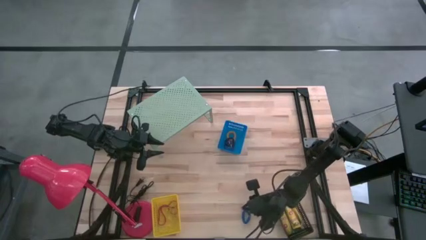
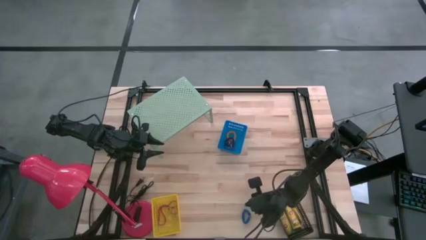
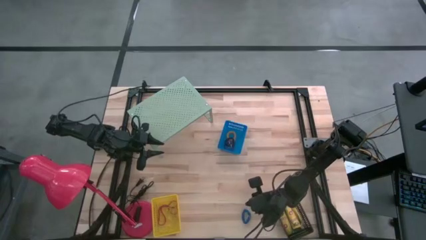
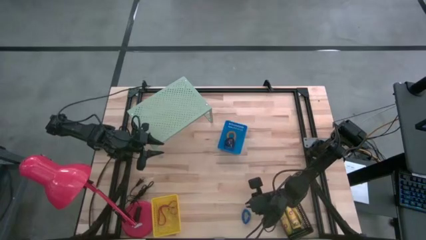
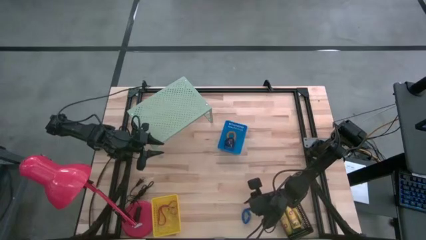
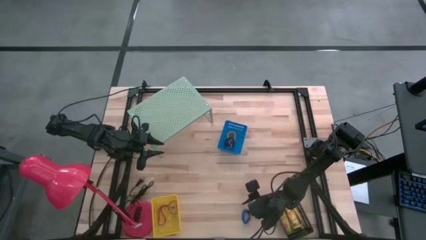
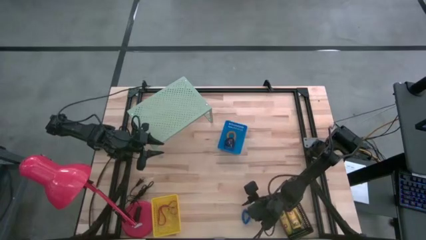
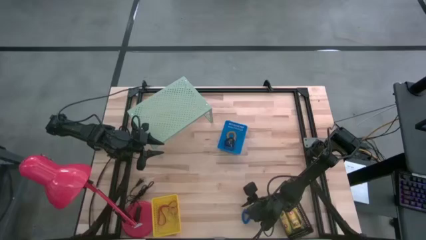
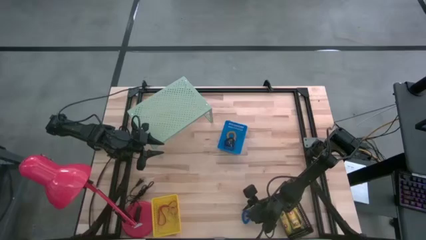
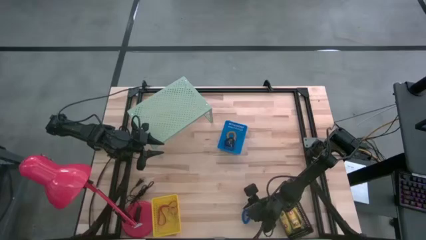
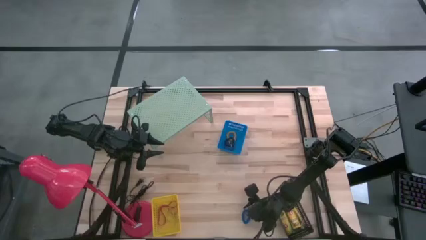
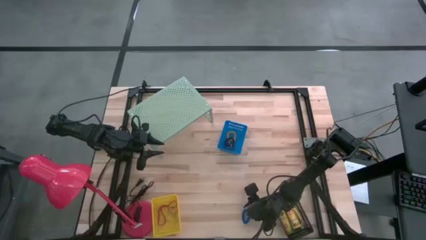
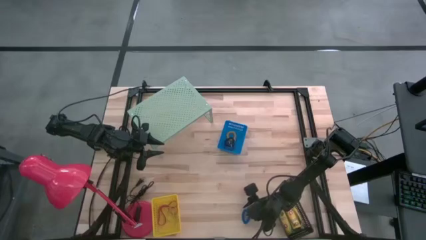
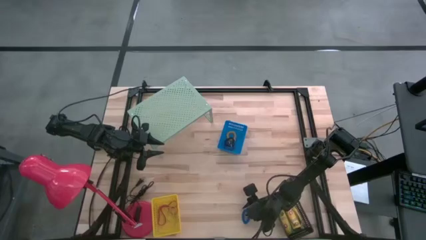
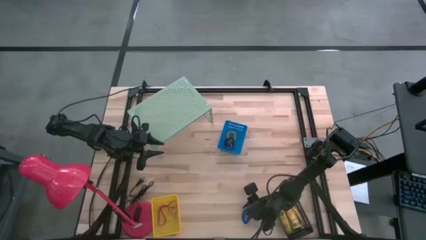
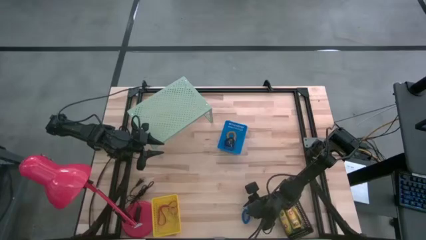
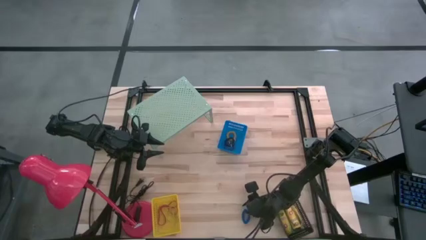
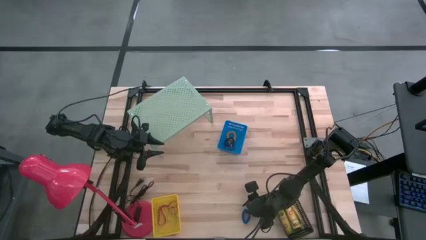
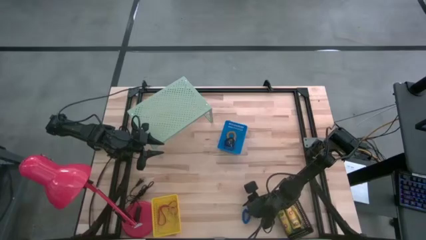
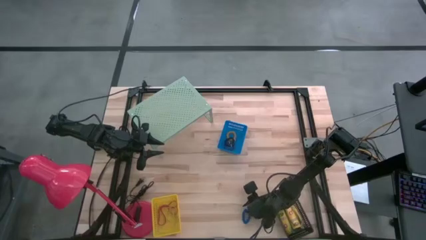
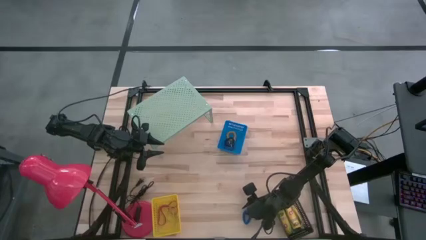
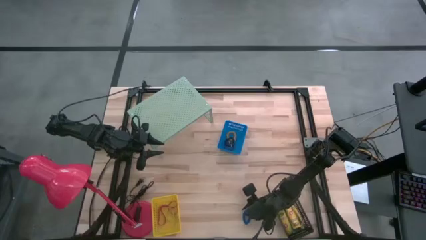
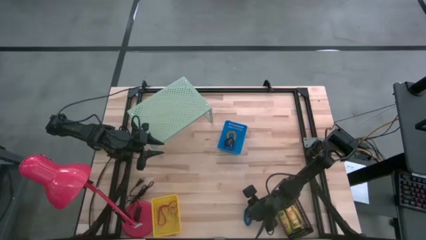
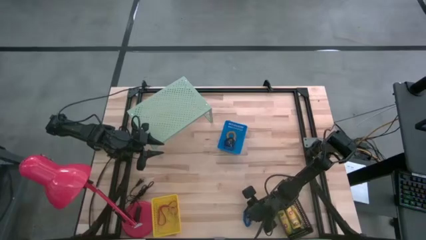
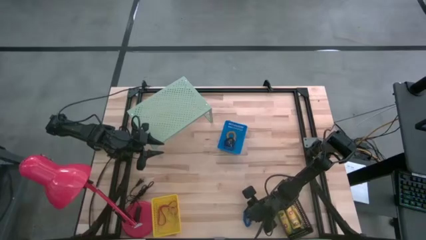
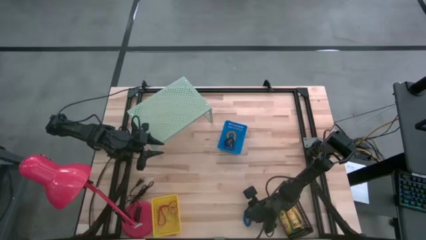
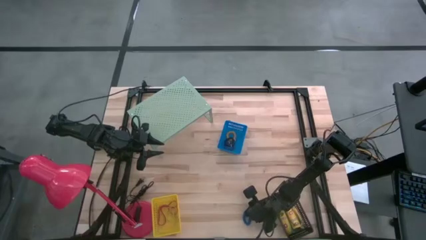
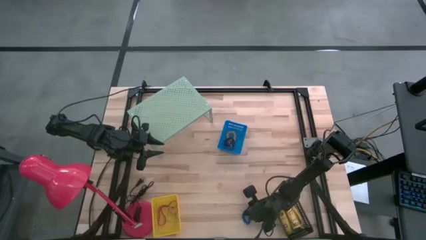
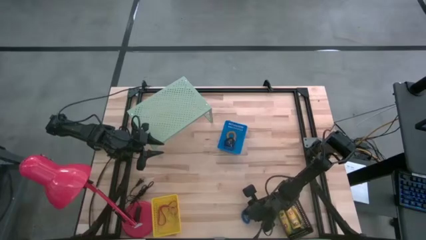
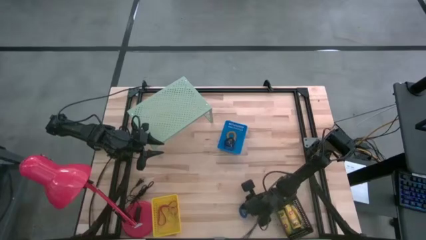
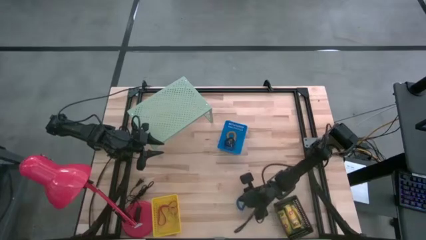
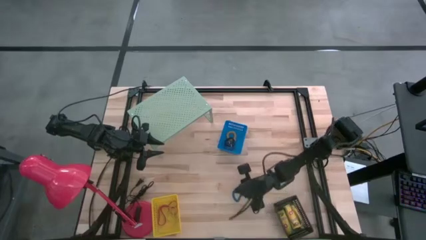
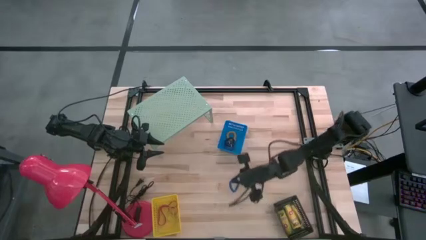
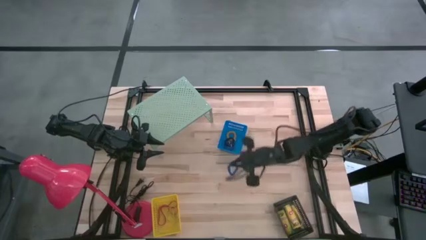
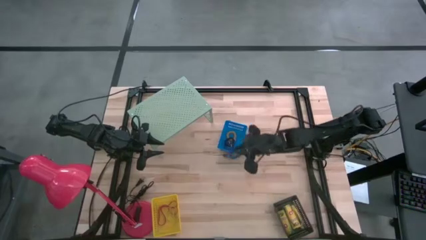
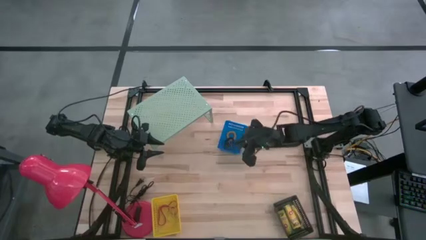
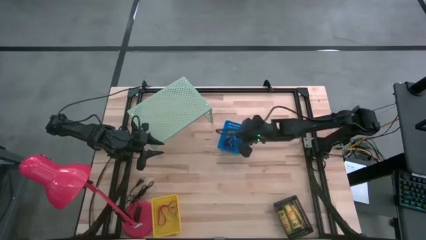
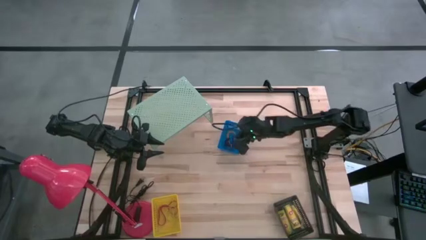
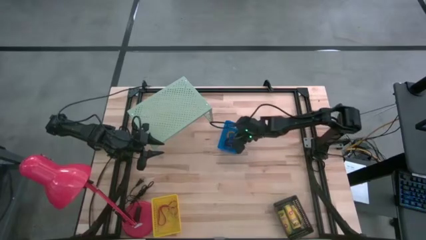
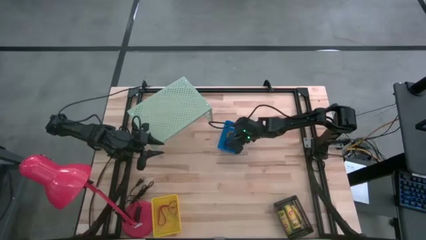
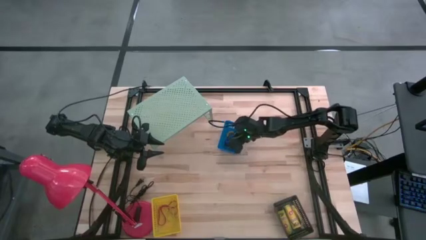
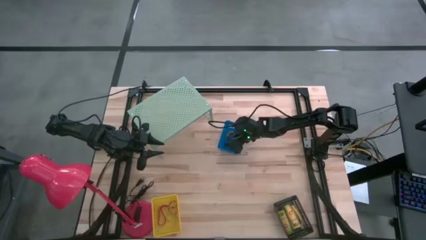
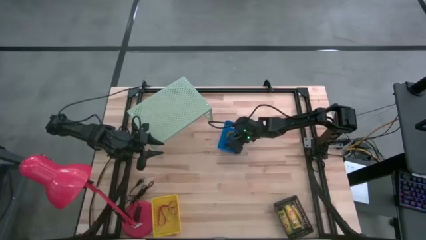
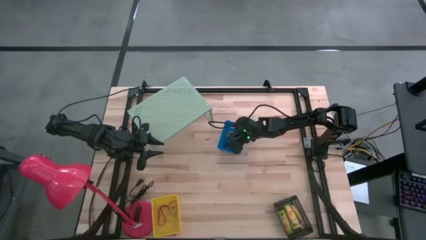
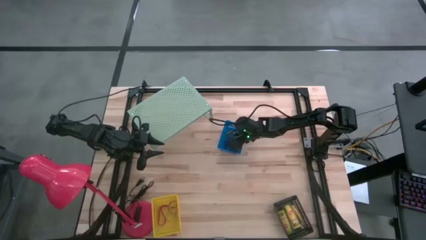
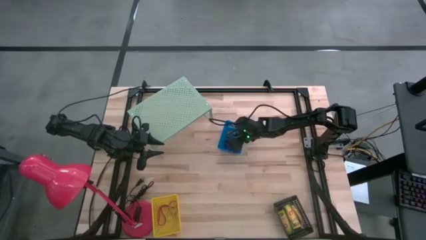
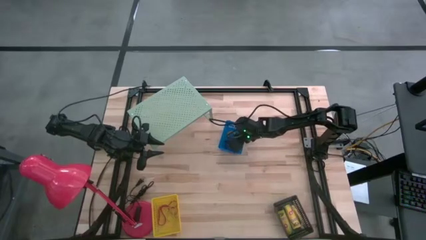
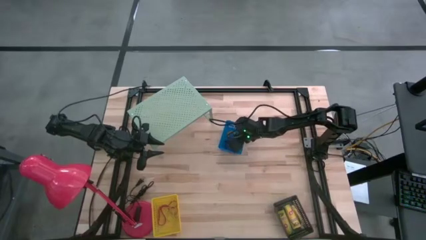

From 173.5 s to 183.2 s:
Task: Pick & Place Office Desk Supplies
Put the blue spring keychain into the blue basket

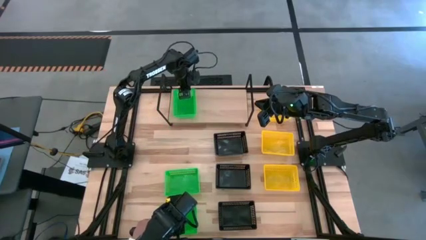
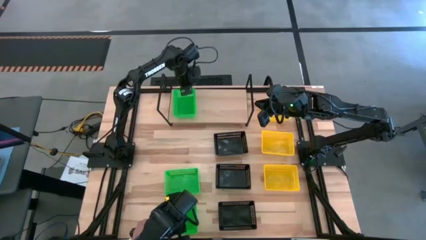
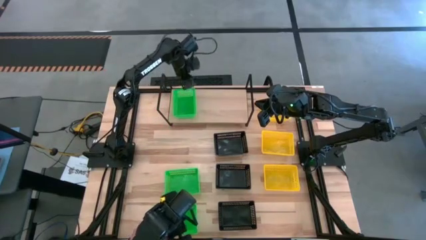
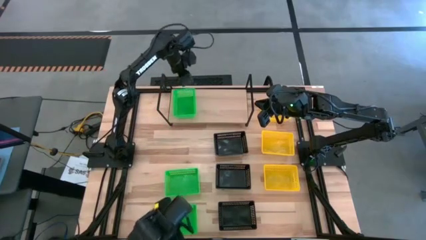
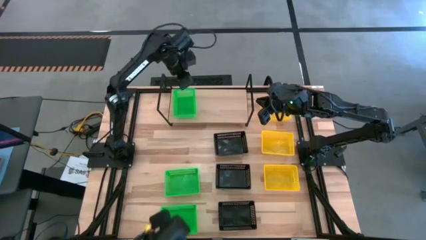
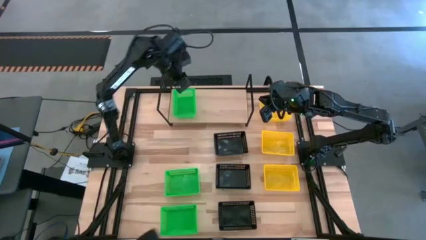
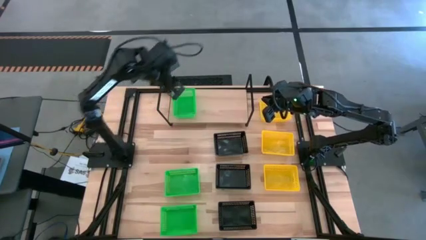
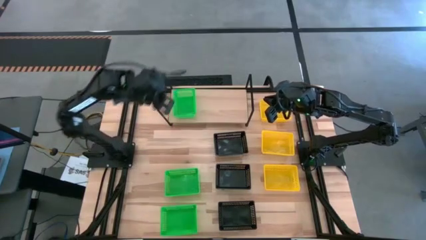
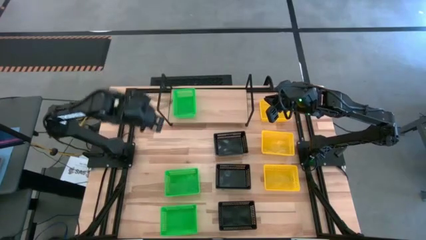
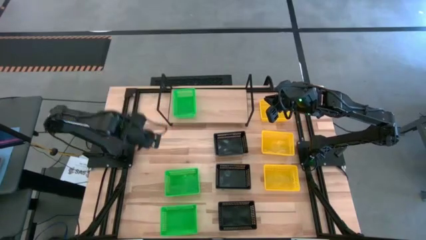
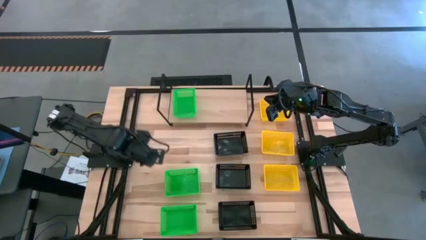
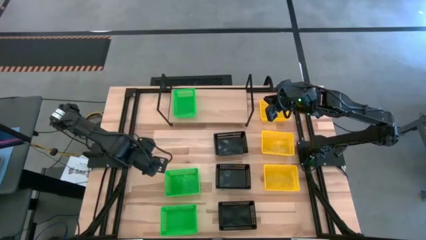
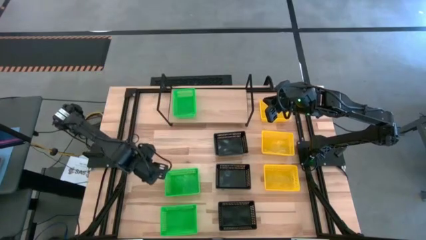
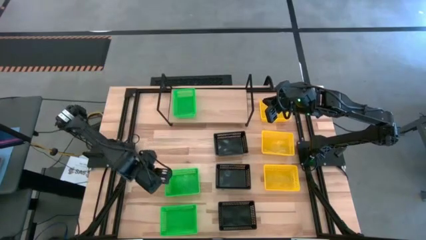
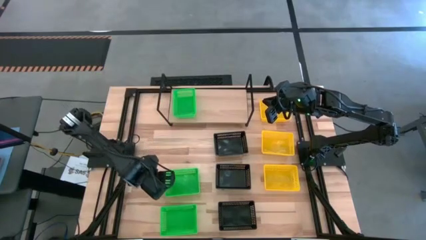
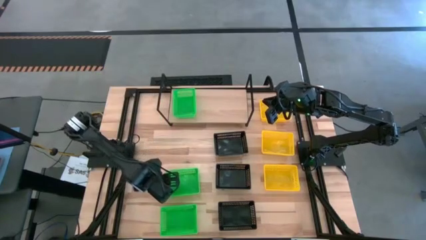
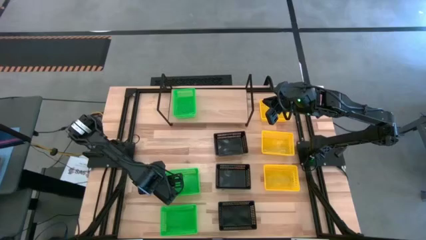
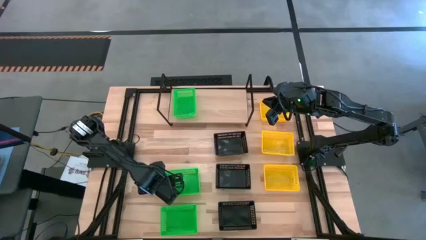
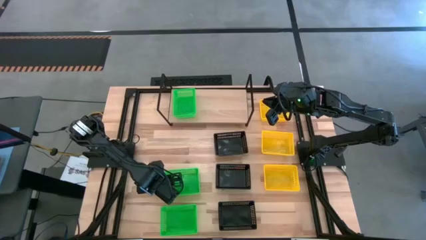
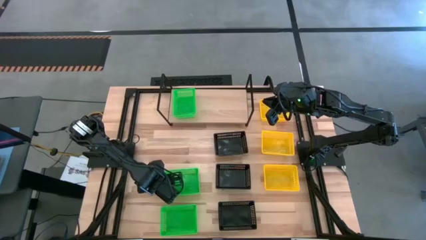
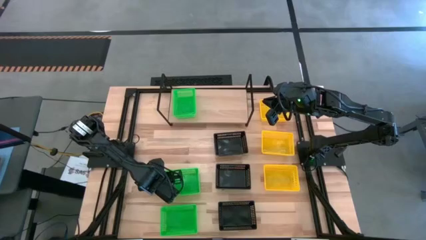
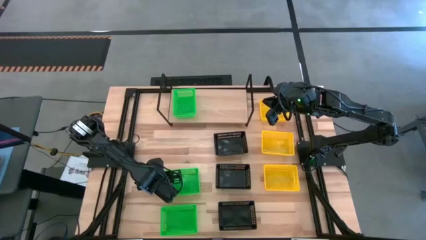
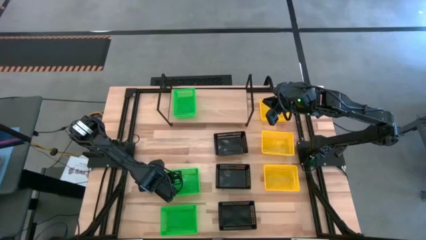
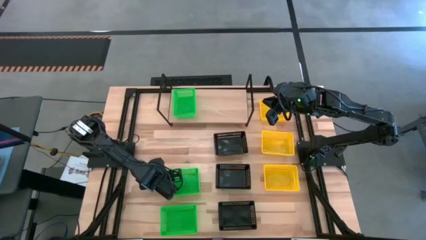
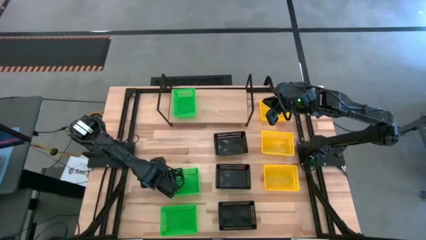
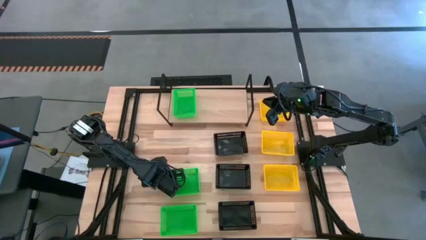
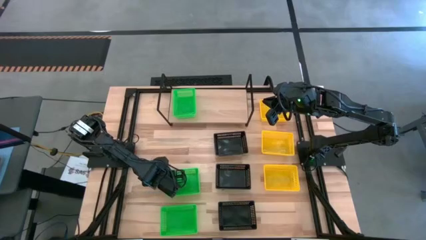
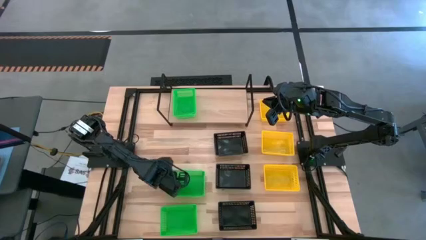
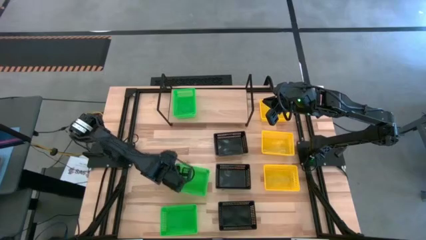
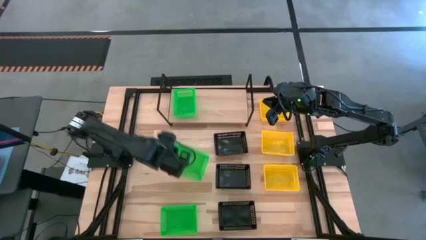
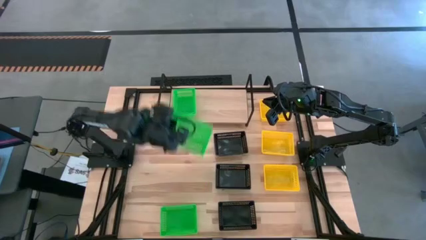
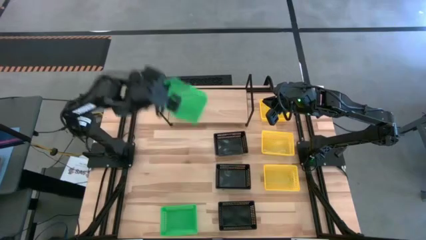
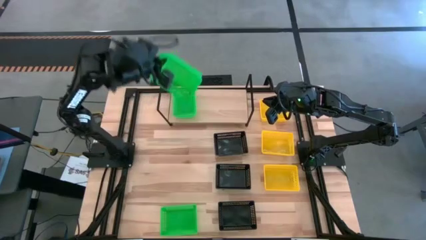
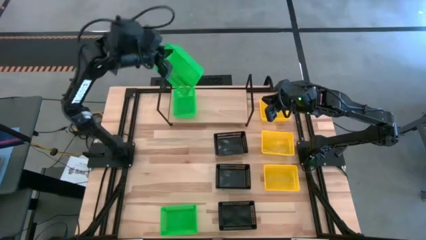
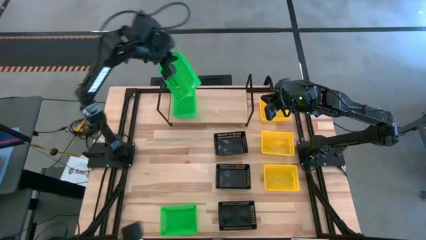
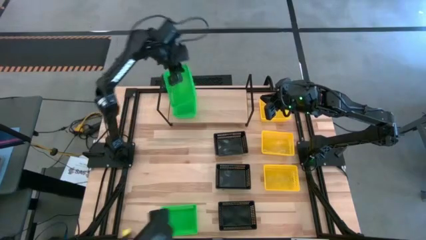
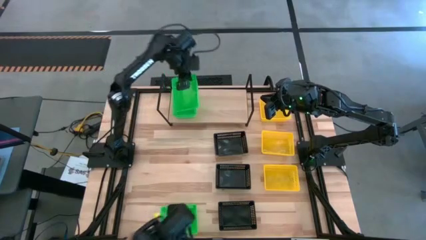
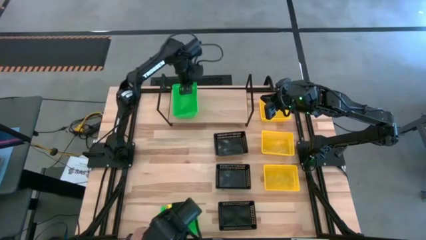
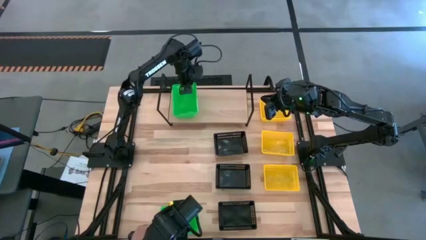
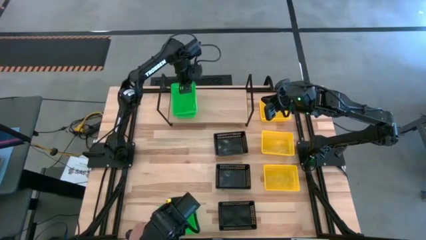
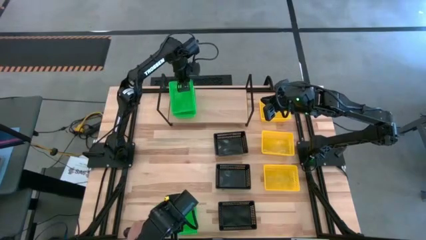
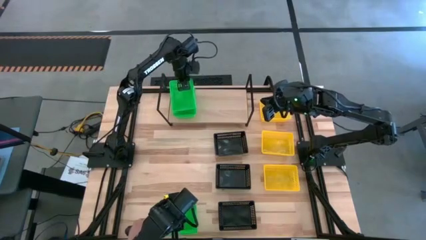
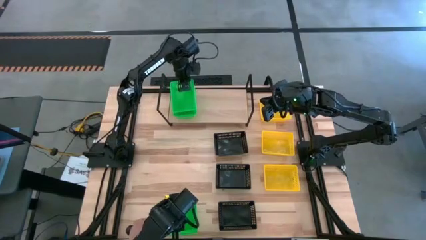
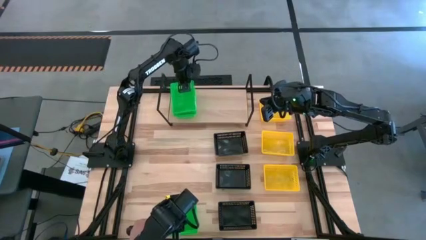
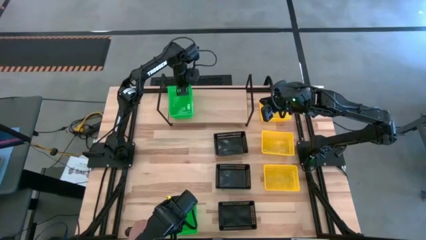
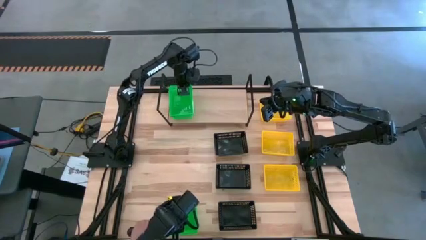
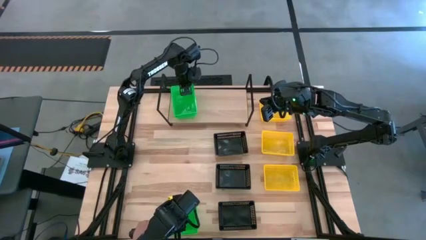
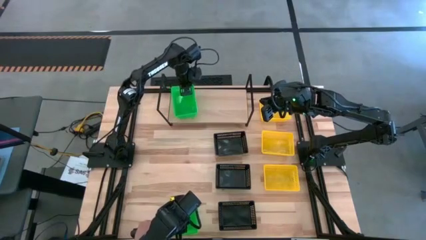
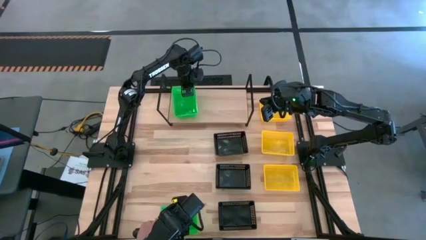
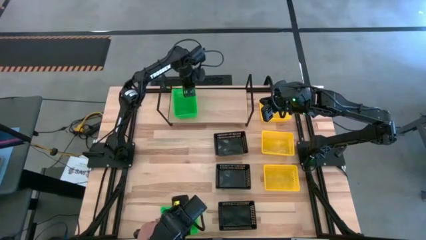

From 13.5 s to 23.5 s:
Task: Stack baskets on shelf by color
Stack the top green basket on top of the green basket on the shelf
